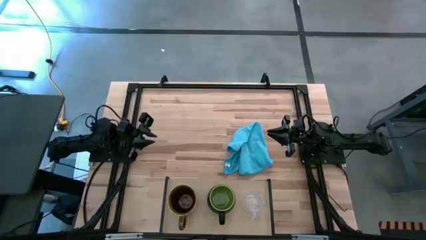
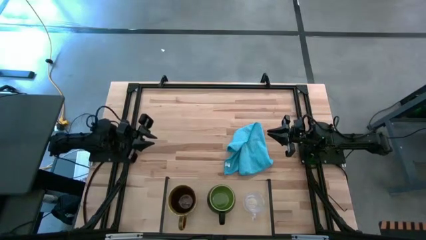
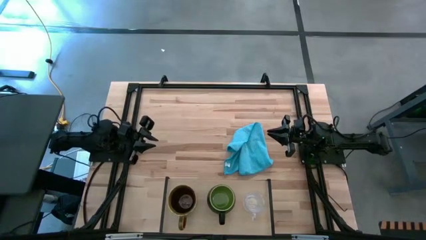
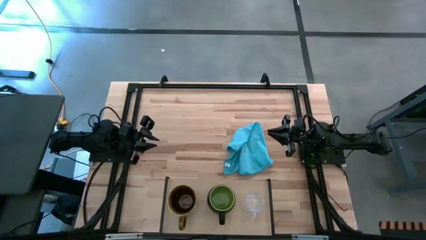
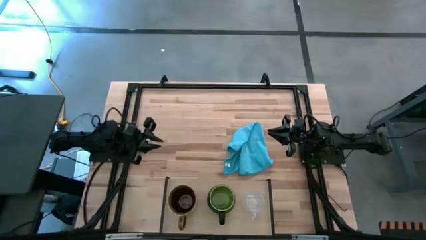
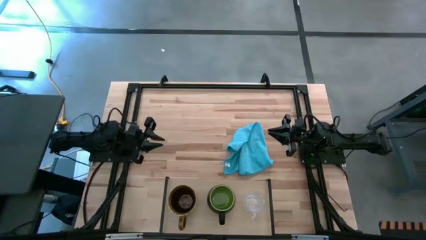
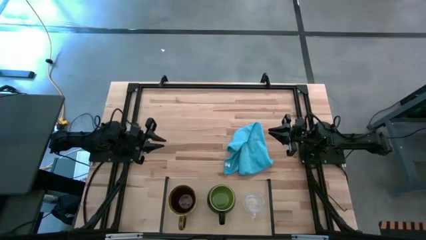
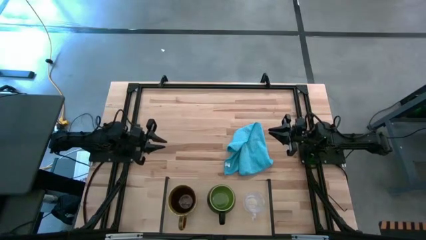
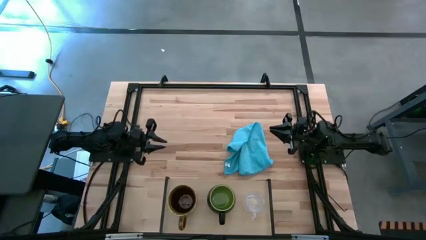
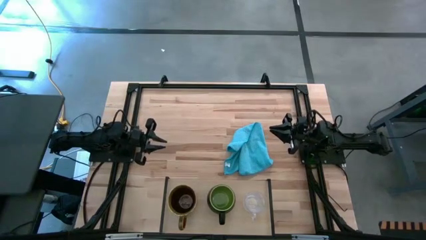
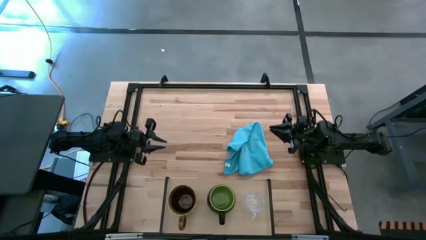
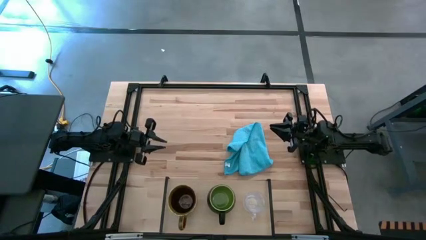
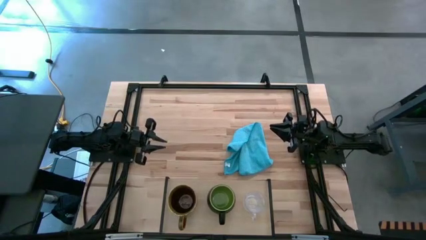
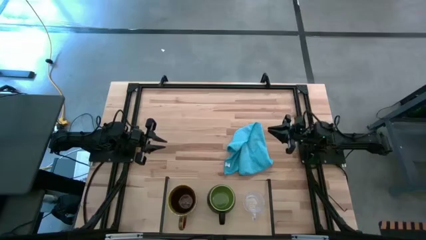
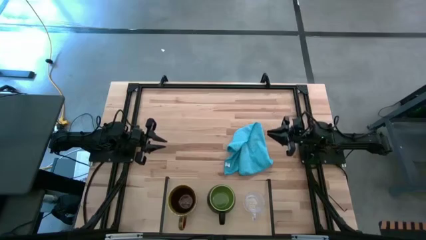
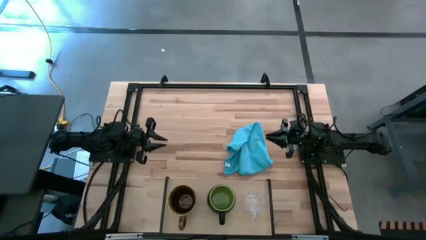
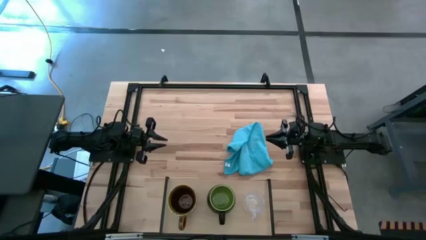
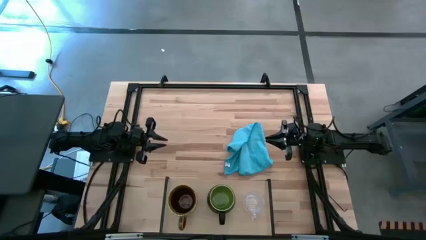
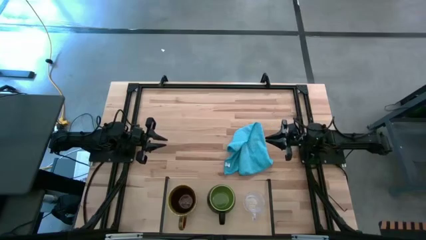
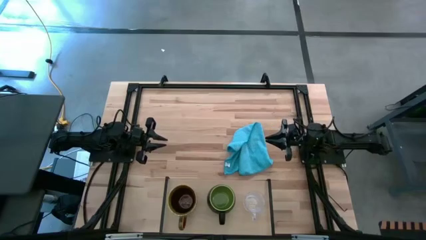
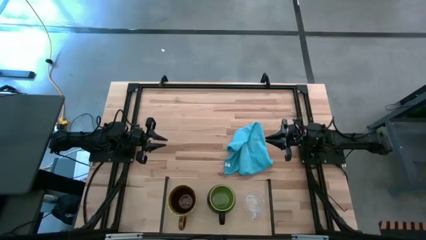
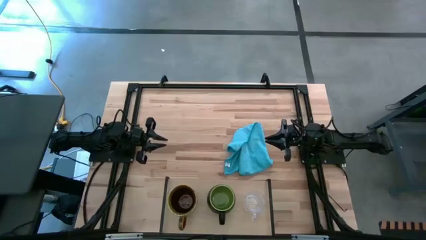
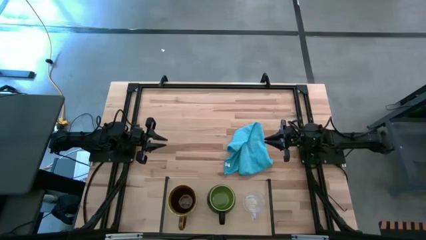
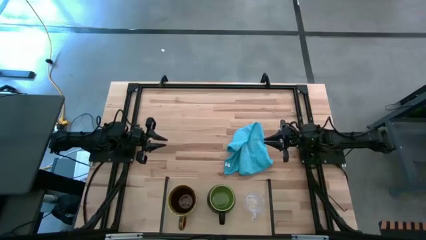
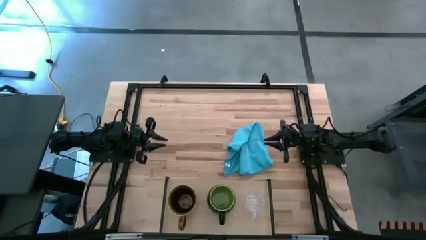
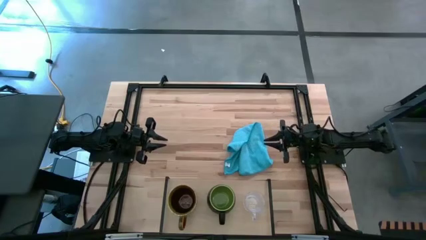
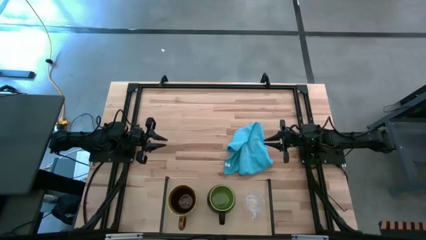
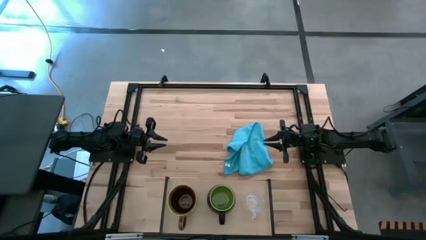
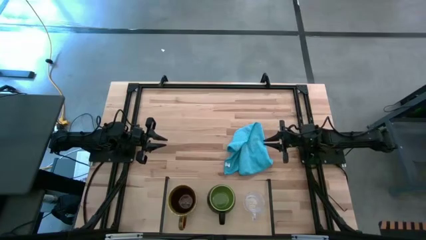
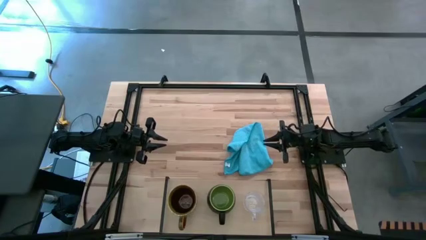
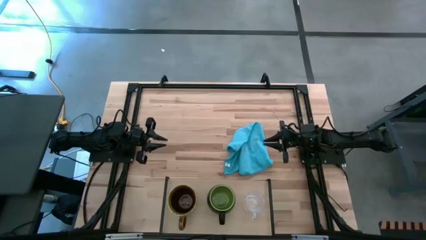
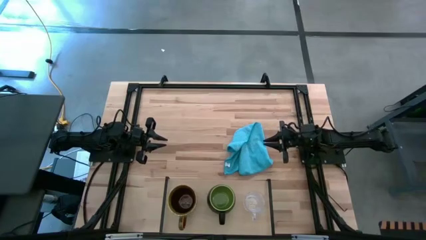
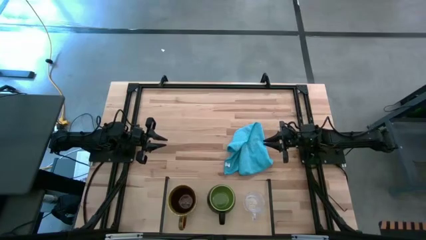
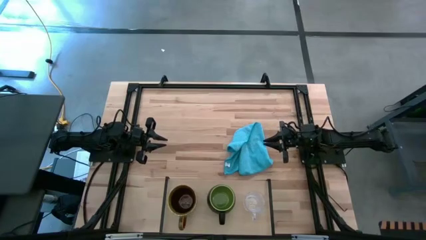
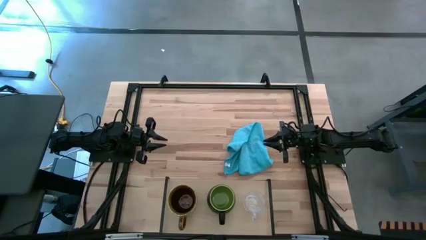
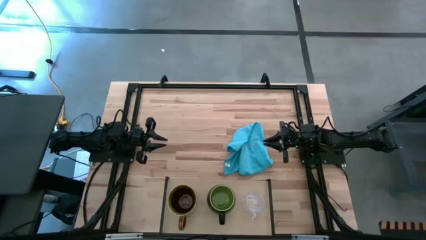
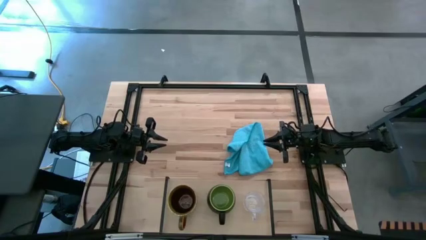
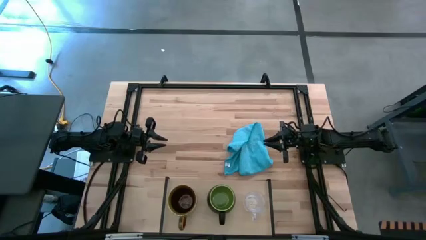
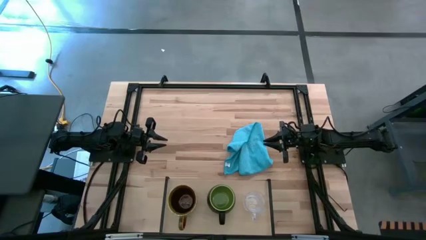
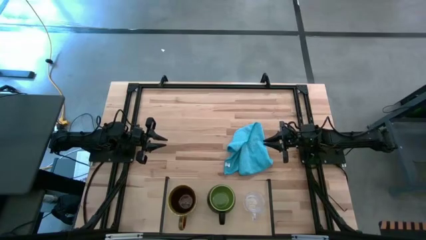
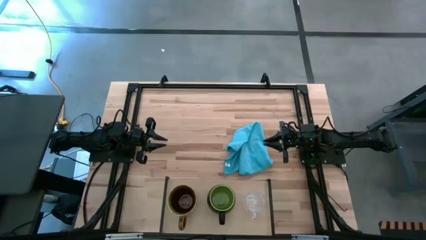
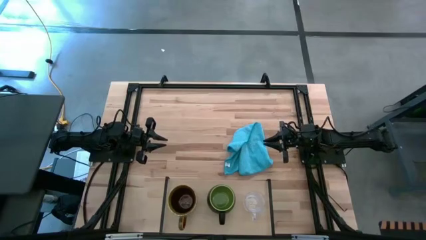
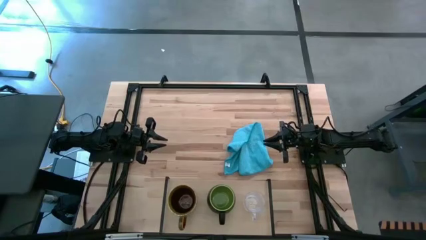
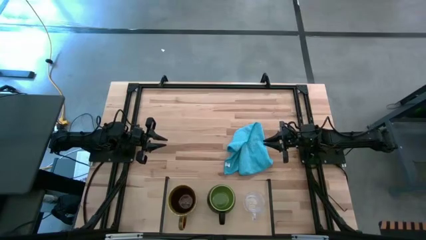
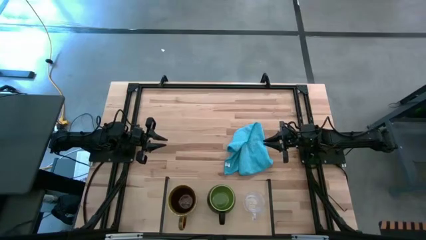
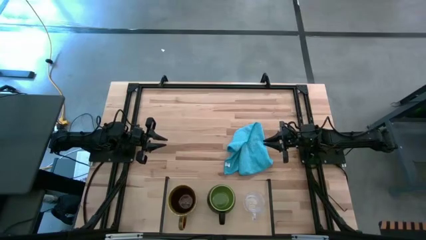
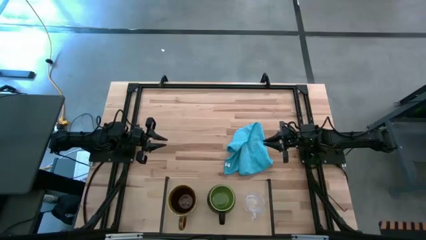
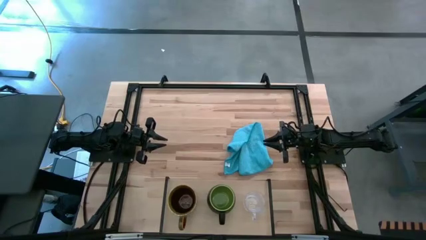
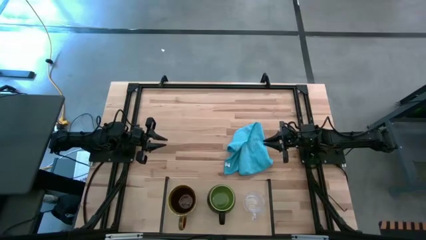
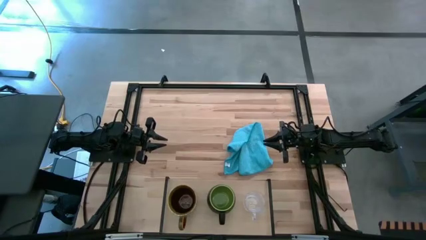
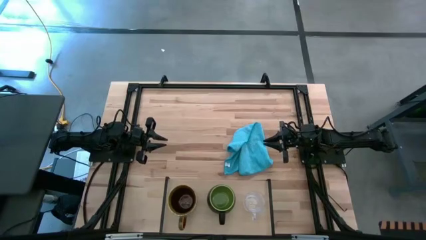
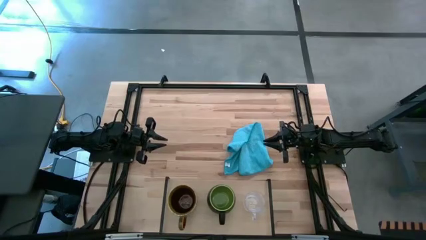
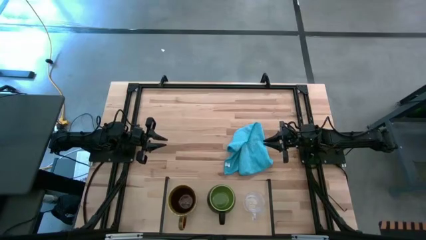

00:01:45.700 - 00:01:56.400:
Task: Stack small to large cups/mugs on shelf
Return to Home Position

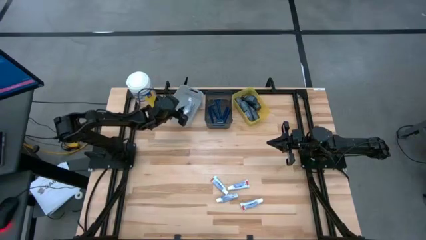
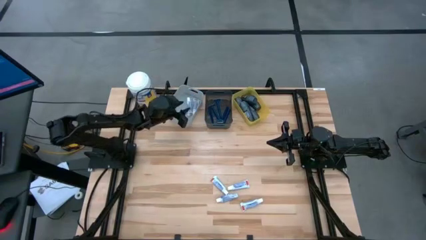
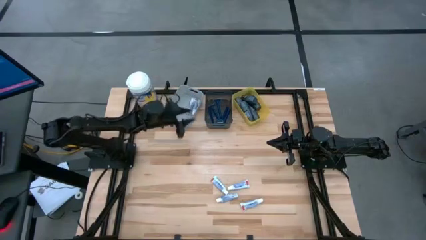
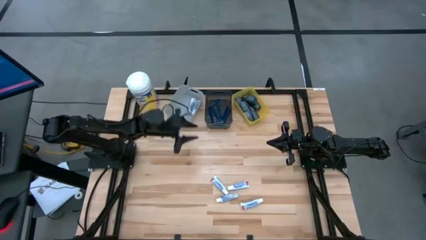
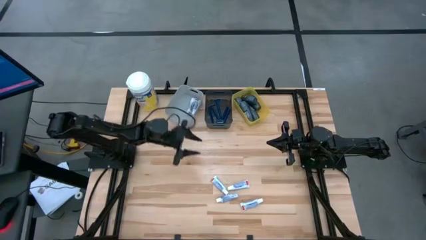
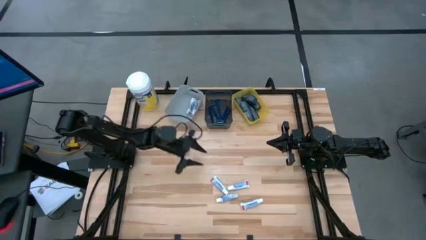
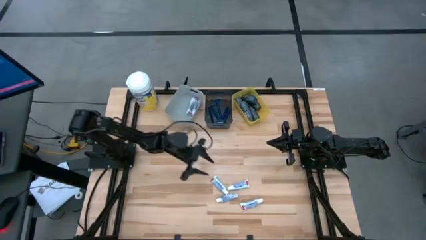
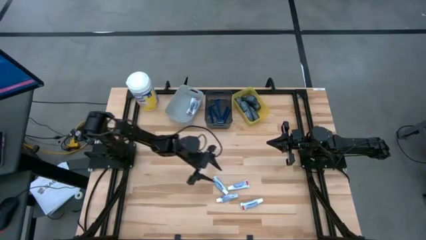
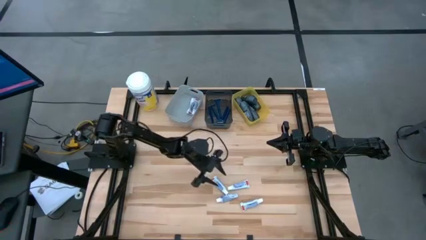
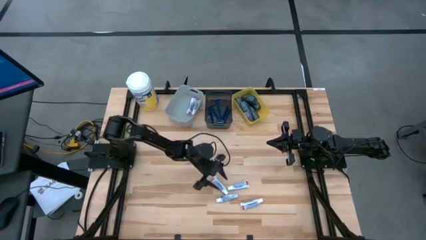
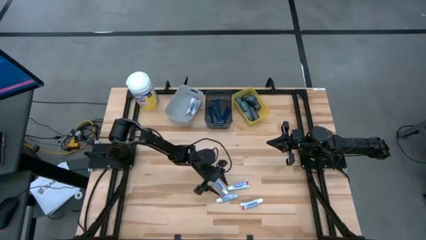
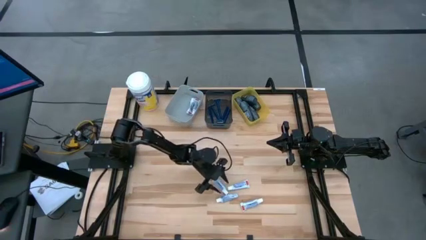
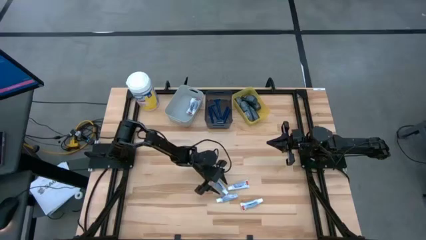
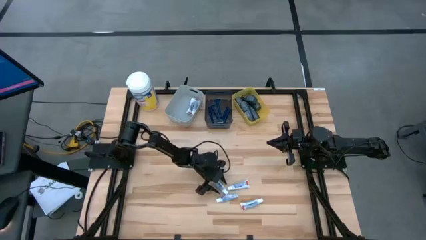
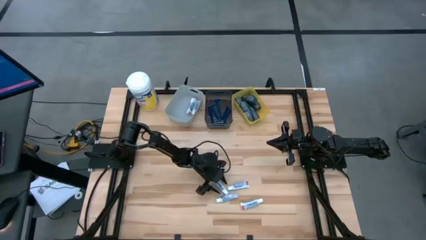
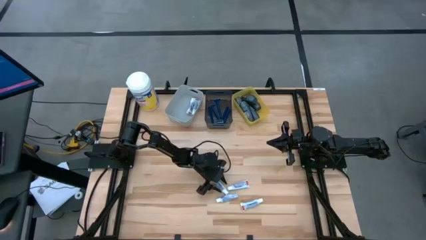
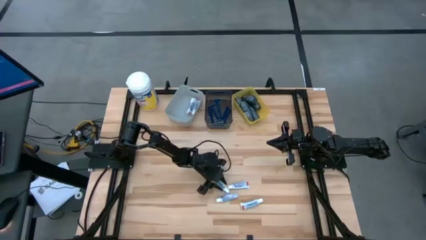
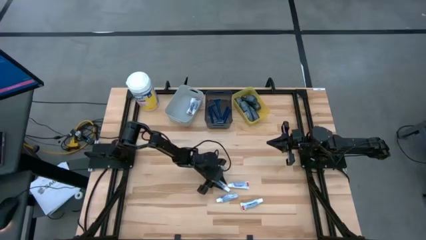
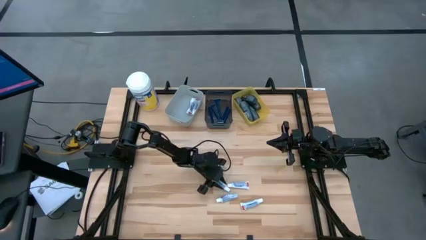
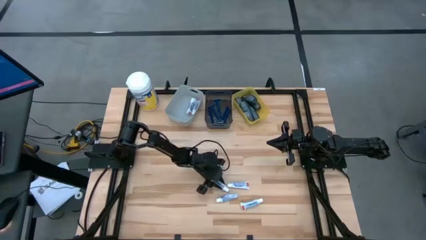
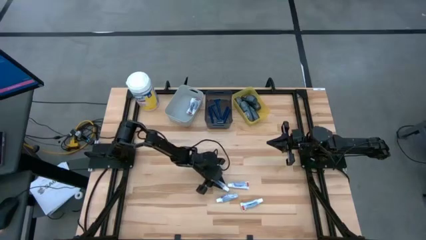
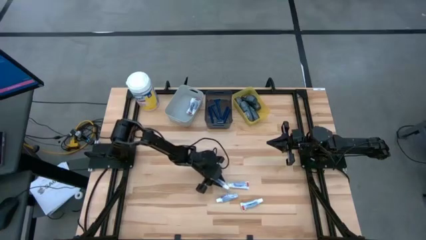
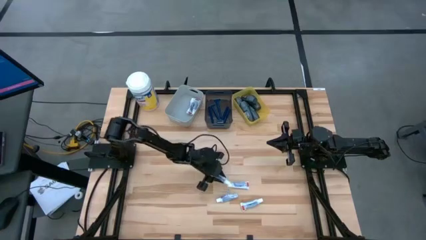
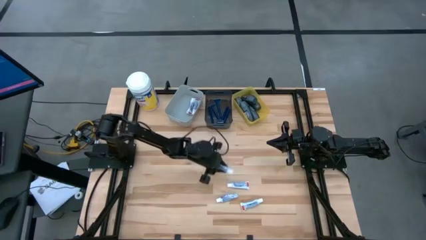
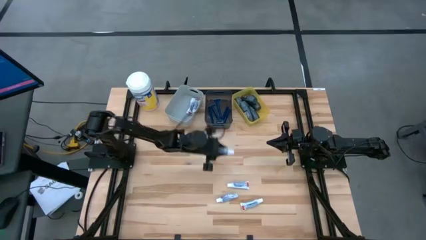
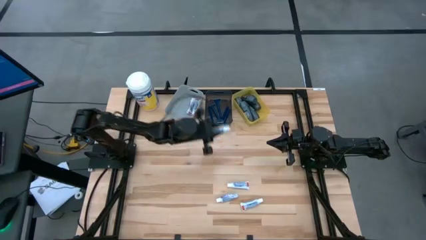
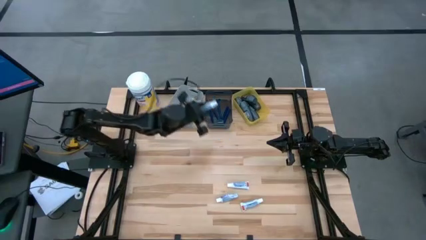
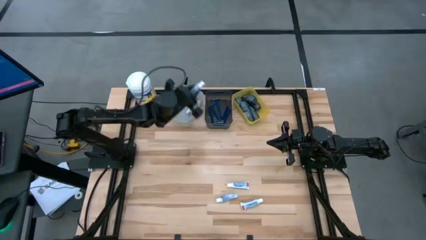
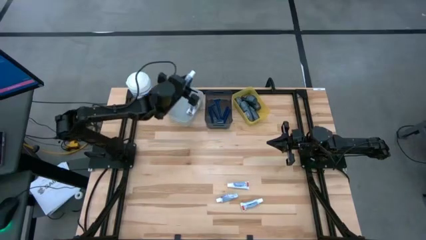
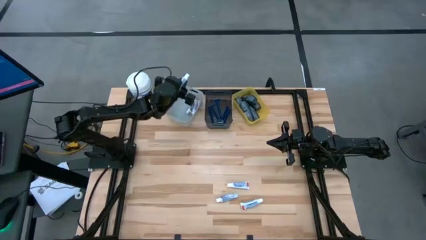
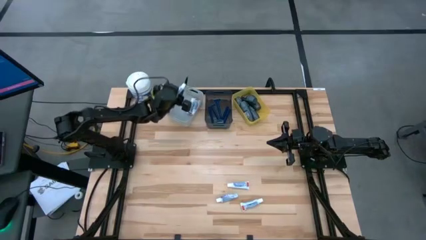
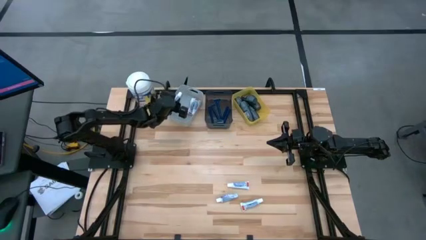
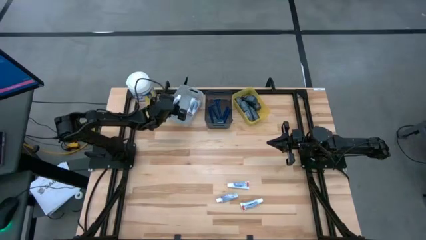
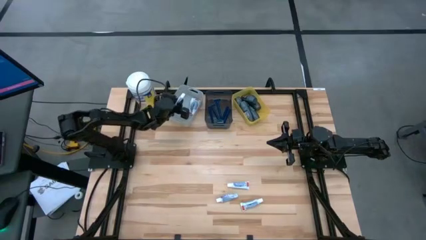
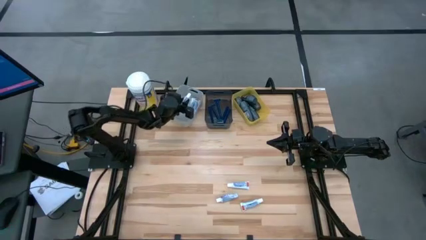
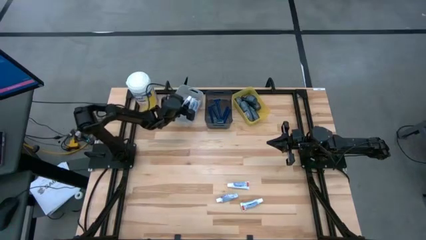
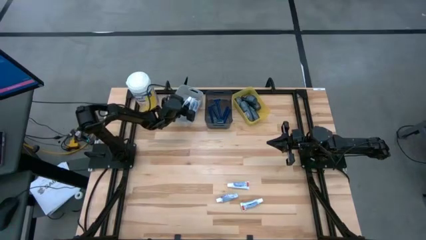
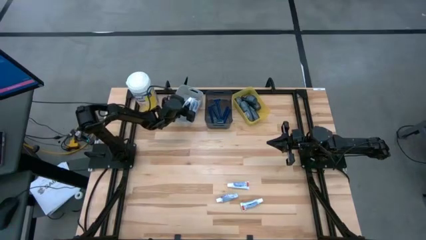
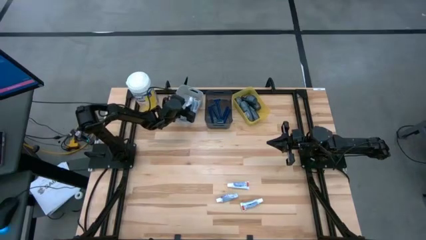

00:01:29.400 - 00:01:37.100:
Task: Pick & Place Travel size toiletries
Put the toothpaste into the gray bin
